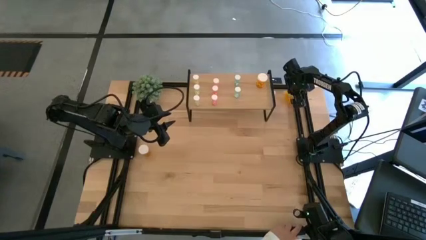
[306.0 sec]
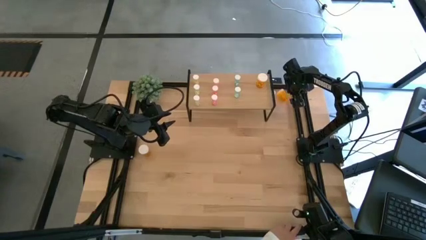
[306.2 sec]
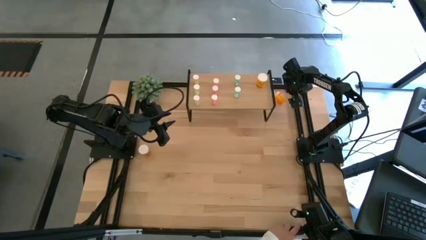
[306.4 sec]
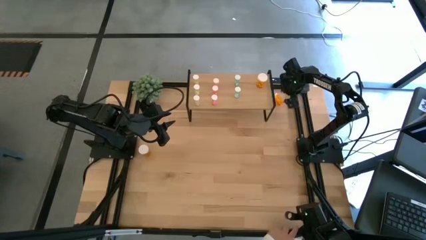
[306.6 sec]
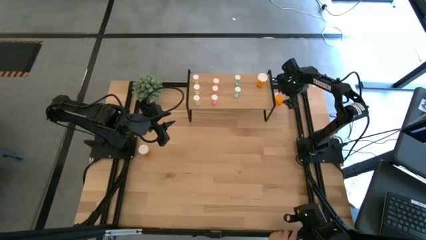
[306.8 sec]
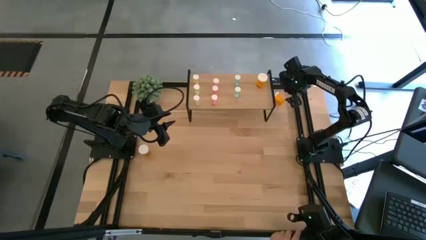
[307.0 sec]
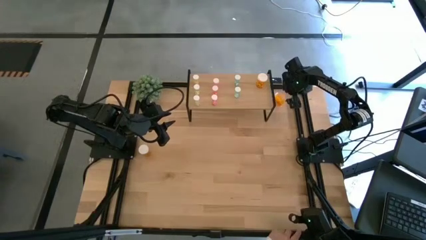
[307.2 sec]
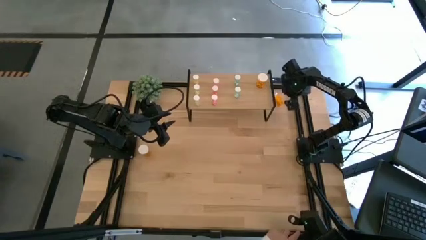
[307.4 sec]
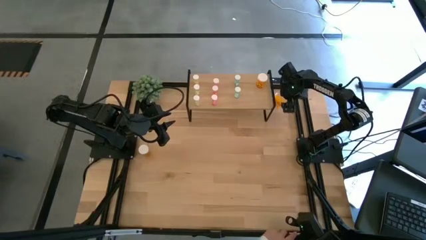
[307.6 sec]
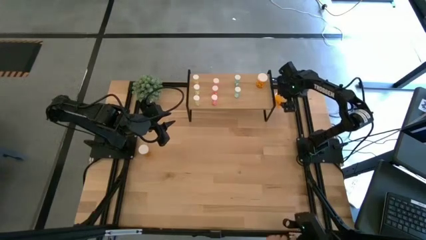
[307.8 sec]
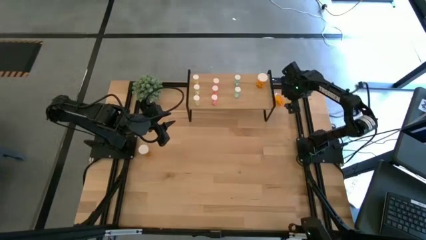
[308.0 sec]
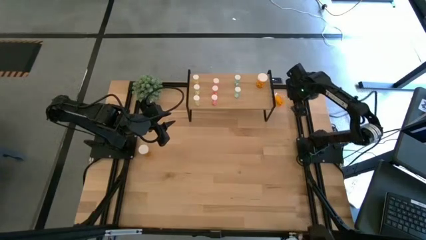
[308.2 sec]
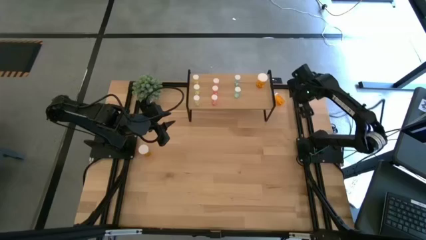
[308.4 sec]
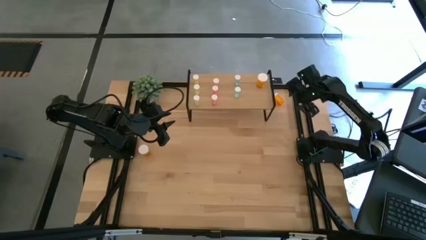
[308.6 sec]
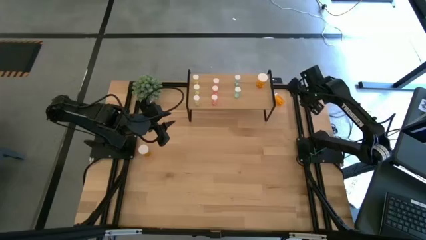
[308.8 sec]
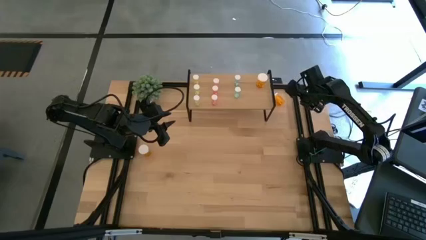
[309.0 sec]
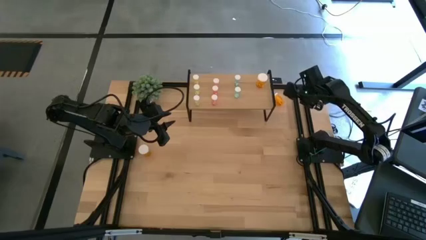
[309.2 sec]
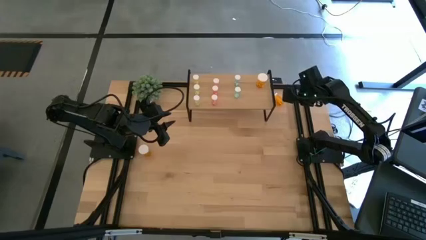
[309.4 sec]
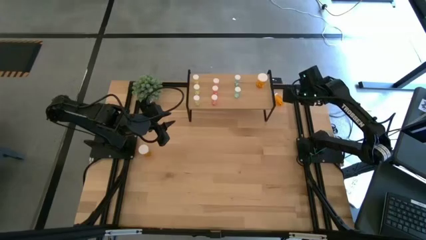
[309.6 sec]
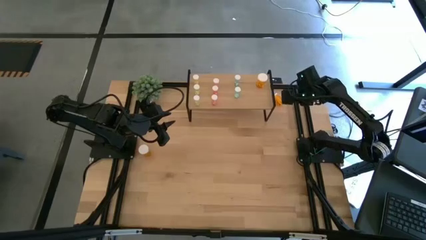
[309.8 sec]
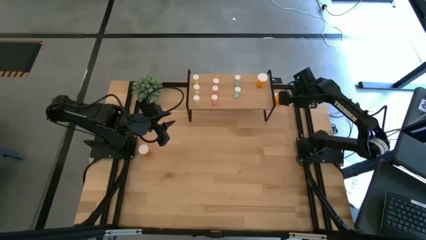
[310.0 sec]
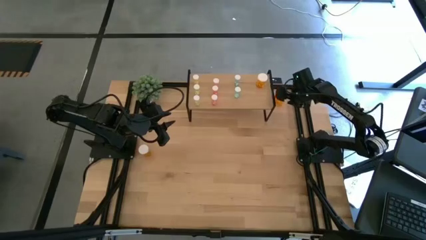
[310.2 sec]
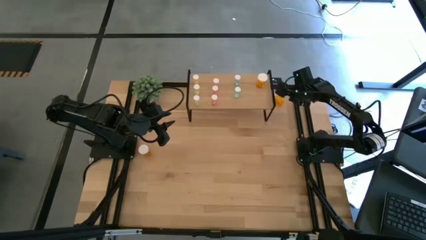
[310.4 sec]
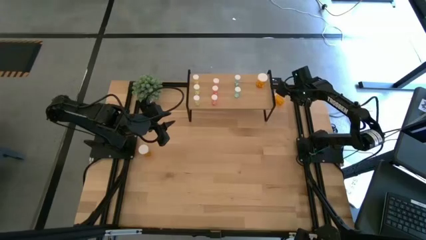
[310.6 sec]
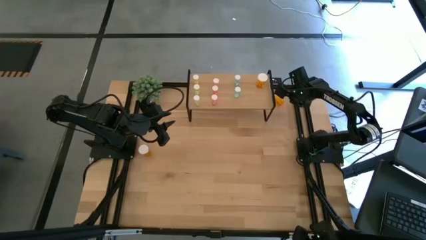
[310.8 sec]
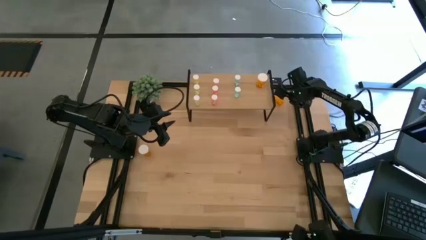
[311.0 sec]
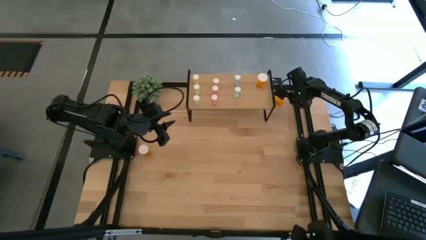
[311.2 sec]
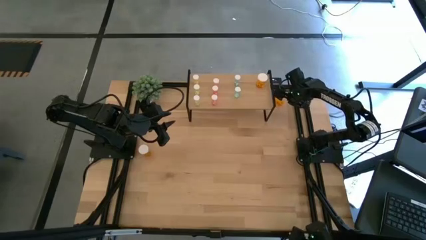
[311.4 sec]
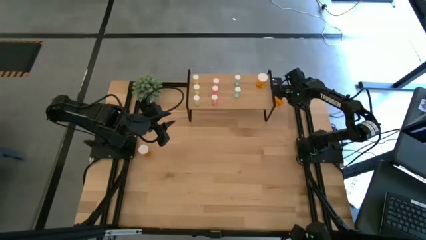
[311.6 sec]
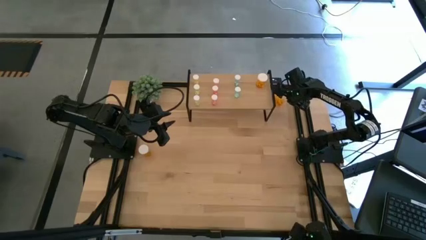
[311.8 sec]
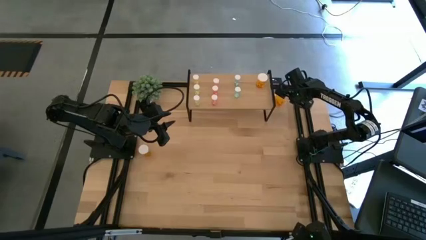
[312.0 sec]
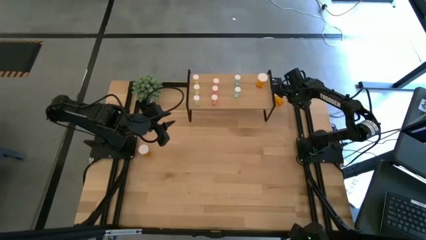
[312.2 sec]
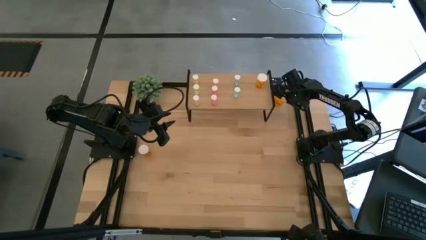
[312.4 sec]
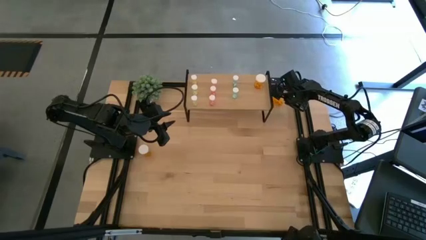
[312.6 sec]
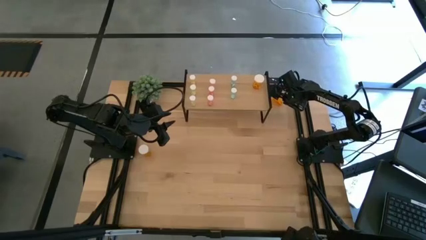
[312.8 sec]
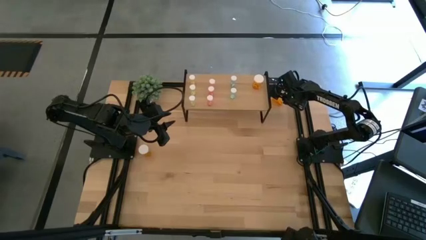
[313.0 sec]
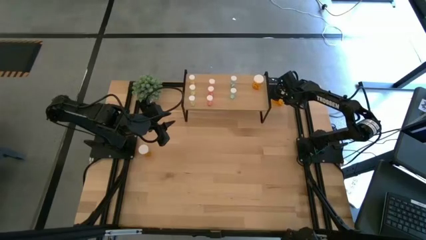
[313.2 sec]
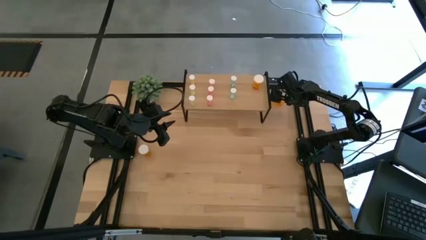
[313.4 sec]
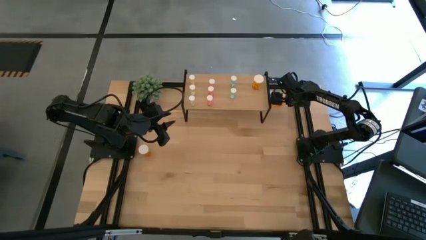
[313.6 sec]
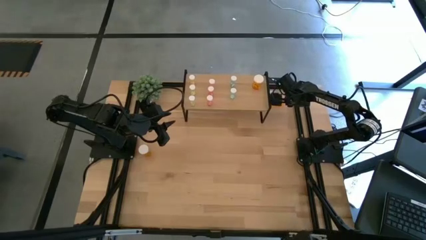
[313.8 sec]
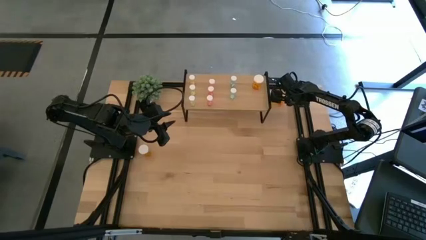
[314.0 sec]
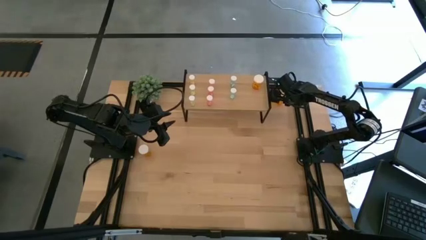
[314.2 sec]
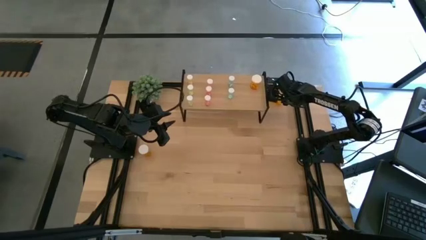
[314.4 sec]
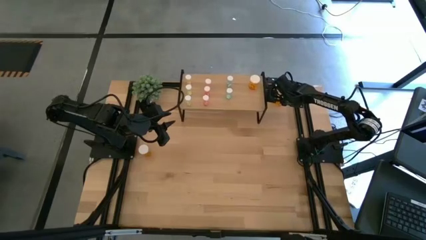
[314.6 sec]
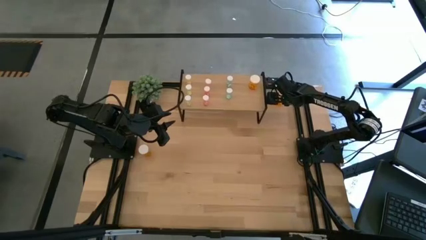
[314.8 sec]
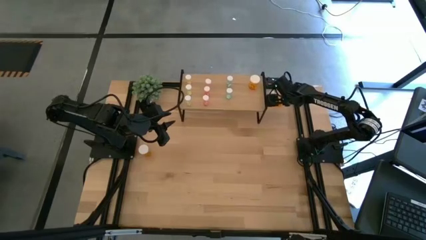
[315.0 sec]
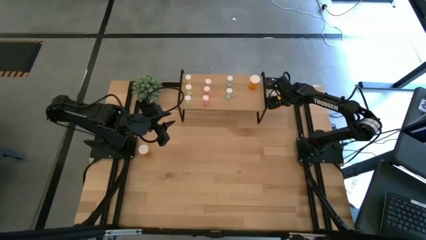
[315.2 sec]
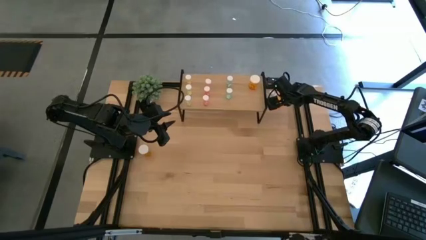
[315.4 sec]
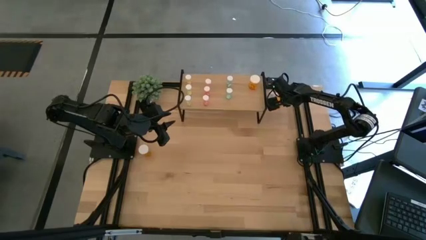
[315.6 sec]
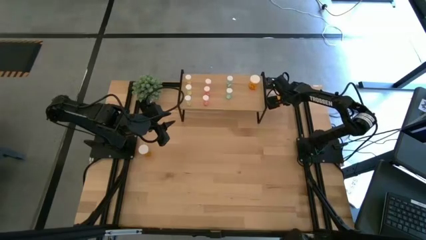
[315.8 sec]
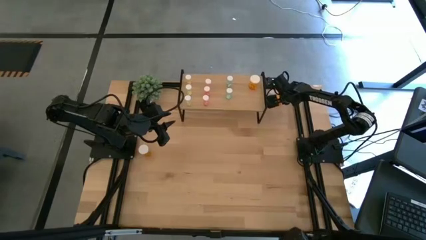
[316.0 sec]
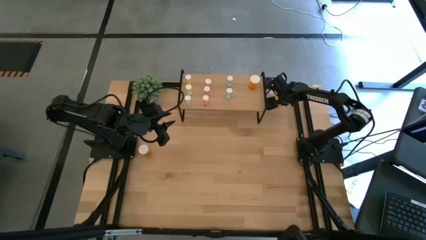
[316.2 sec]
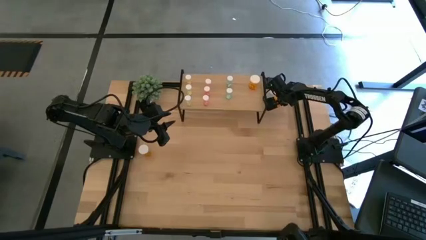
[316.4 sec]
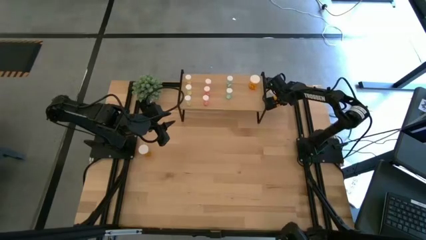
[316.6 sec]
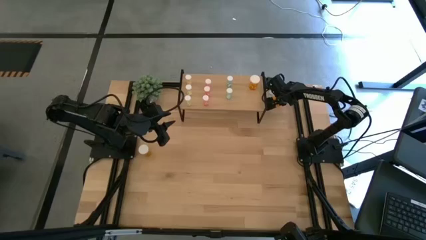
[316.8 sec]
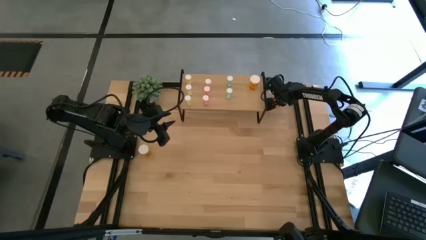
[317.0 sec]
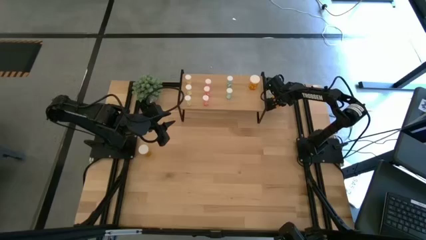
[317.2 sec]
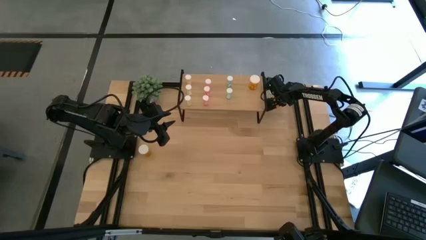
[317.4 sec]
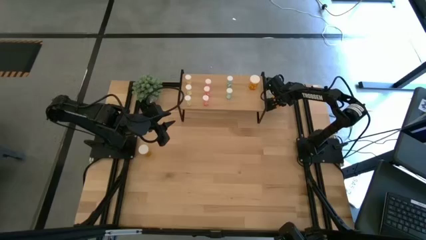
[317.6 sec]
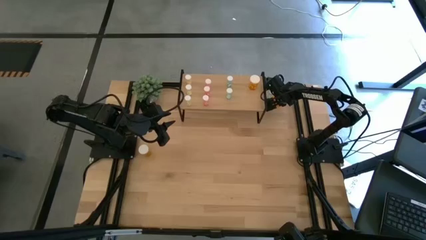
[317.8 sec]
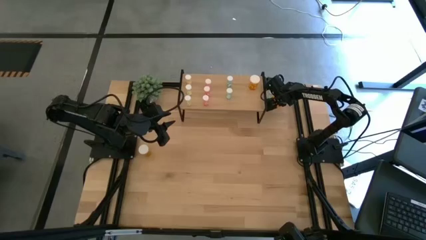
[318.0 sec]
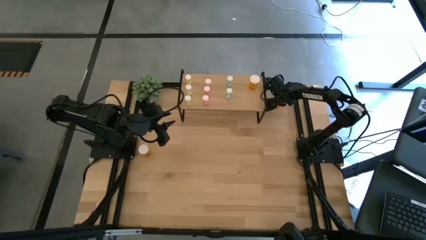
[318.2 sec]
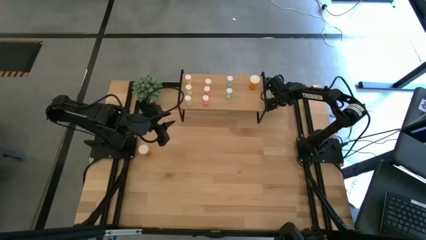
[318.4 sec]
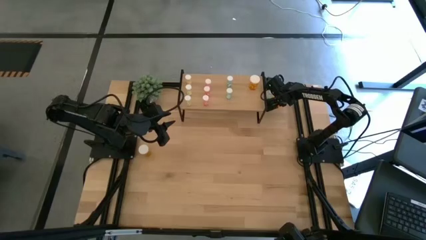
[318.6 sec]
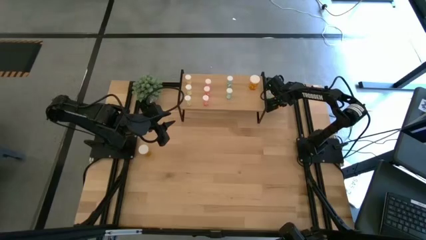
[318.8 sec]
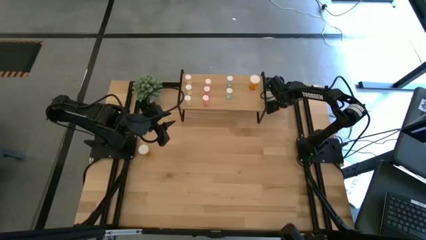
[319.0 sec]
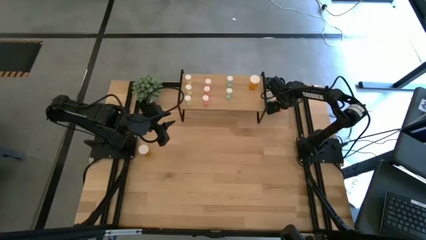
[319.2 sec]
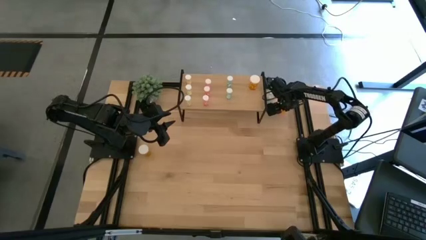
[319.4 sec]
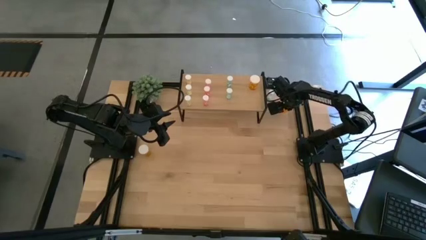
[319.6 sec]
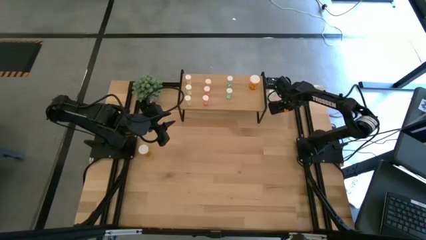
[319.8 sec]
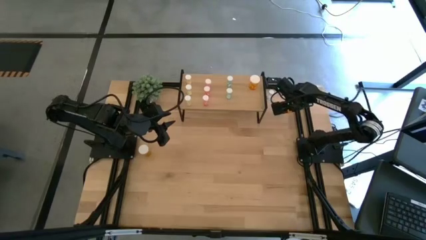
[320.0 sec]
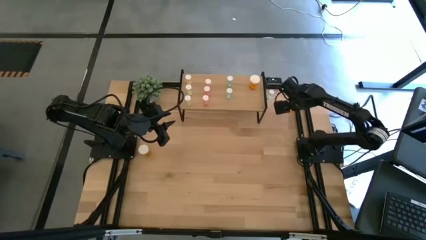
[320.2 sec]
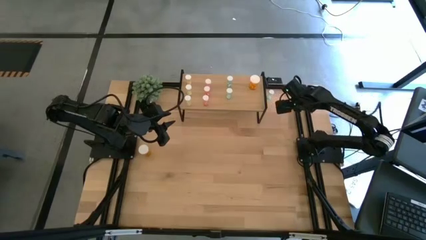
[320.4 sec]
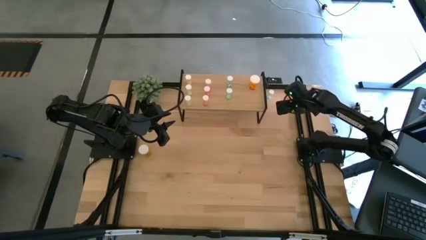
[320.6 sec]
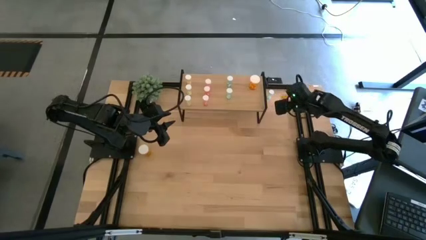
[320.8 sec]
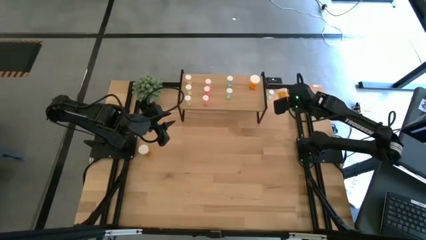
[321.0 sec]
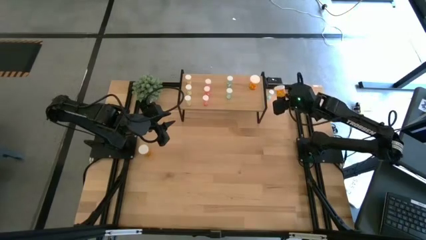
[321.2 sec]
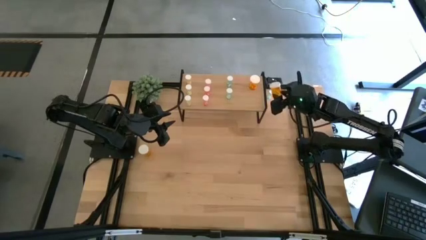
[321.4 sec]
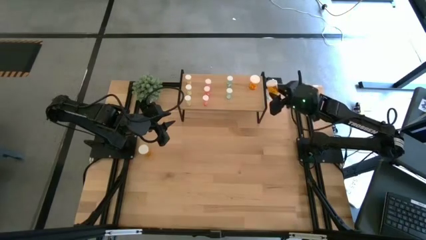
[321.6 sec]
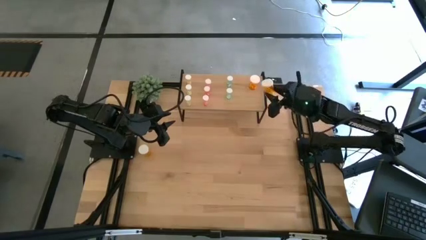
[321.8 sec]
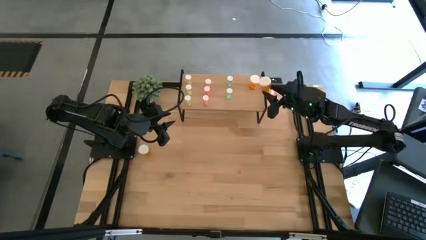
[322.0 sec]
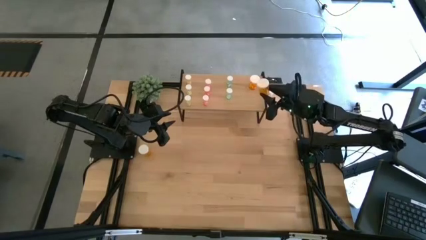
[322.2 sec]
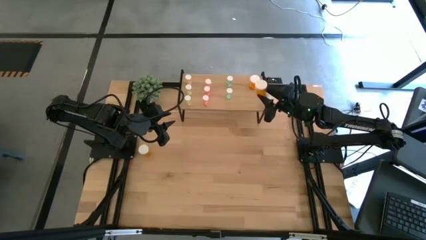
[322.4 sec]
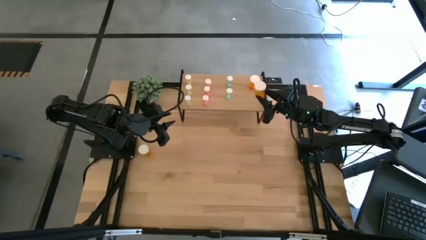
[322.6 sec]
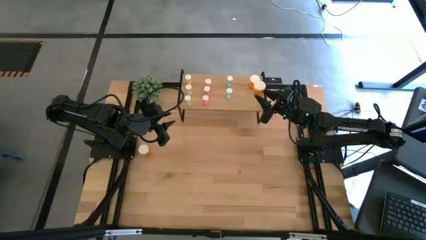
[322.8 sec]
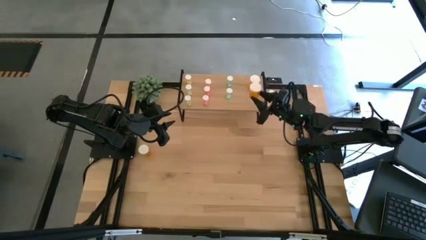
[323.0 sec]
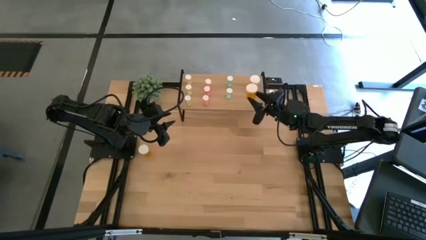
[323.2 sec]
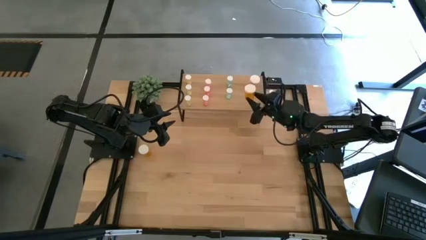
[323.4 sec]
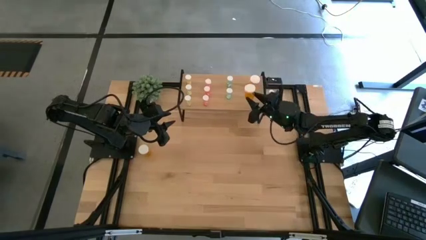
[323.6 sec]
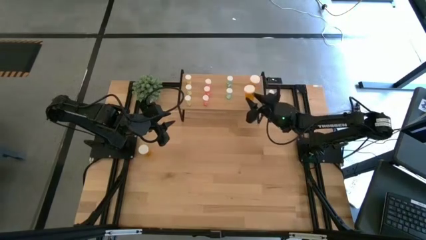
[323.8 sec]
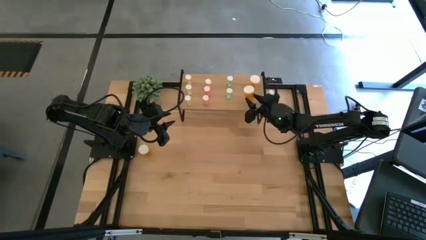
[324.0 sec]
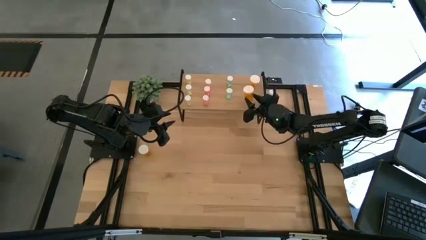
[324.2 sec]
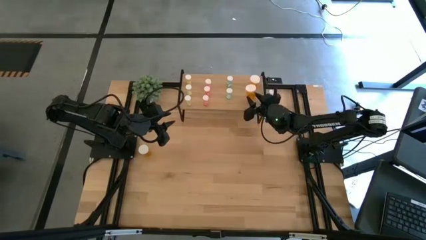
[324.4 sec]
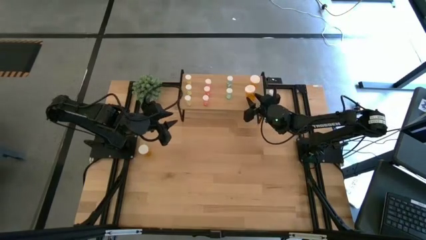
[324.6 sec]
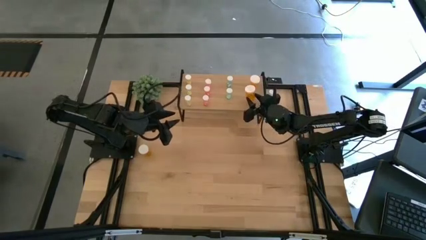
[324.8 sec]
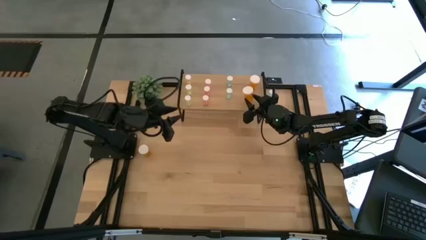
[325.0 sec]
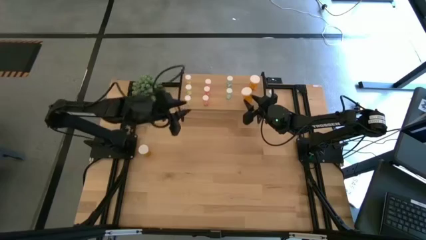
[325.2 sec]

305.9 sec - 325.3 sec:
Task: Pick and place medicine bottles onto shelf by color
Put the right orange pill bottle on the shelf aligned with the other orange pill bottle
